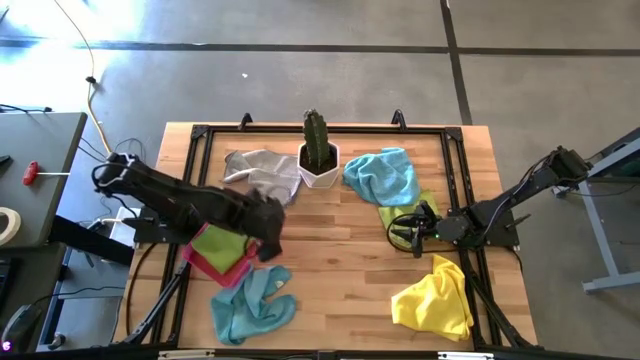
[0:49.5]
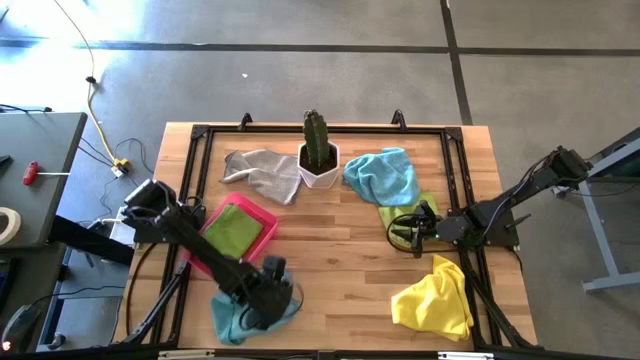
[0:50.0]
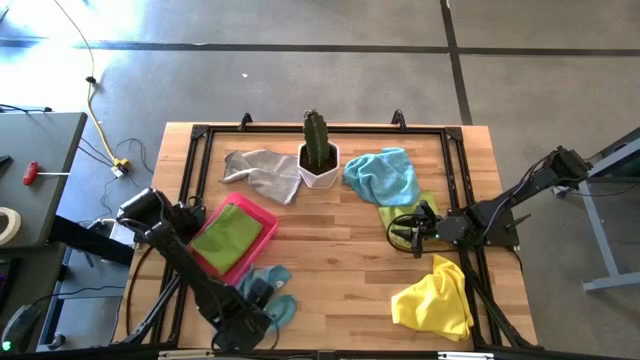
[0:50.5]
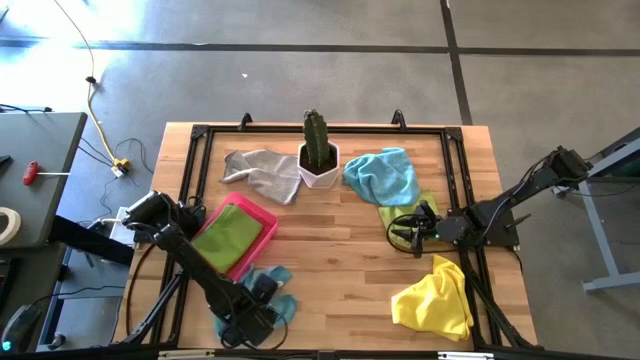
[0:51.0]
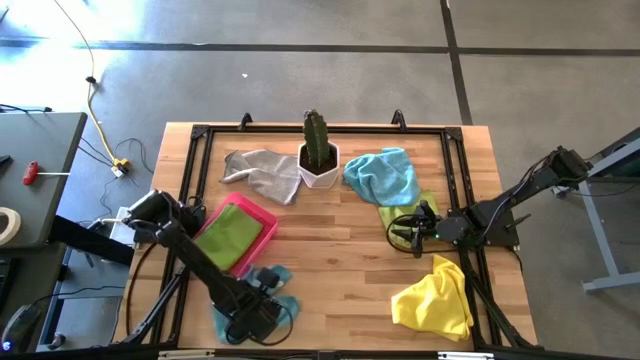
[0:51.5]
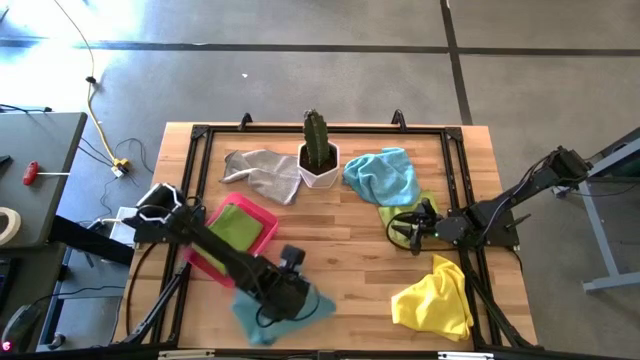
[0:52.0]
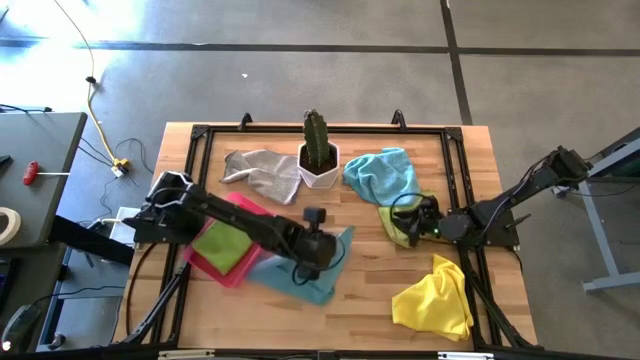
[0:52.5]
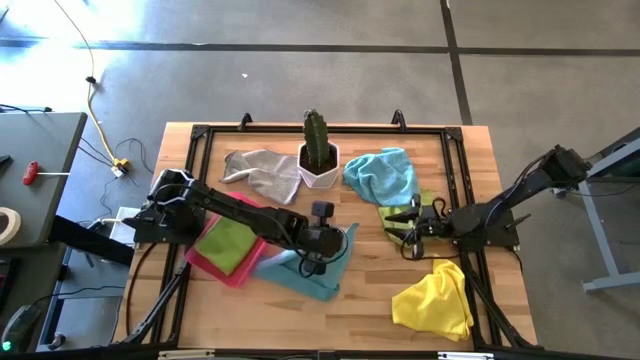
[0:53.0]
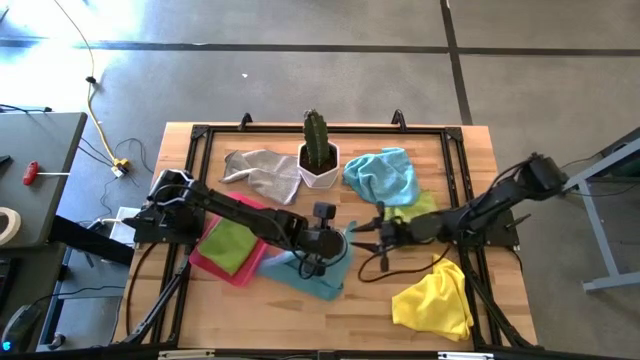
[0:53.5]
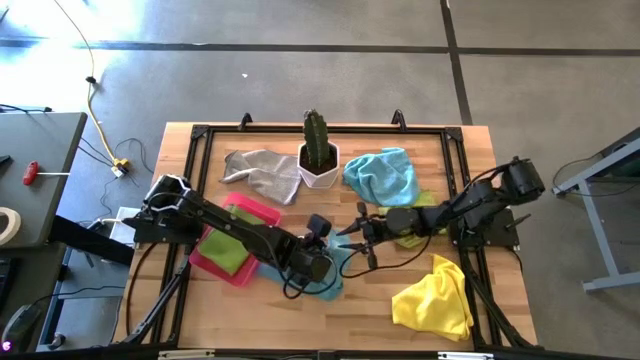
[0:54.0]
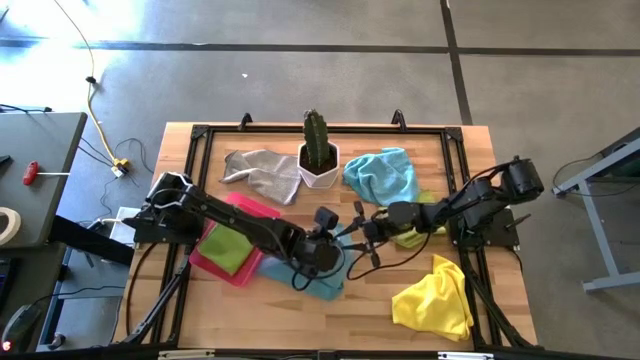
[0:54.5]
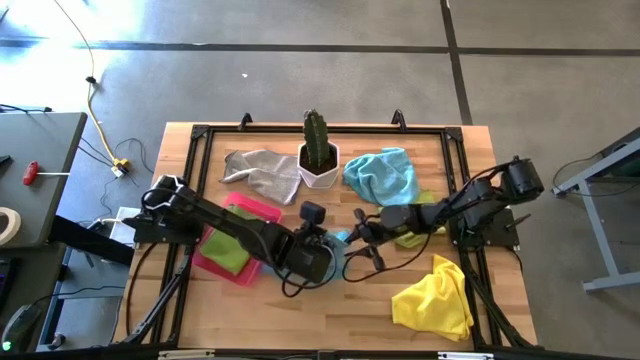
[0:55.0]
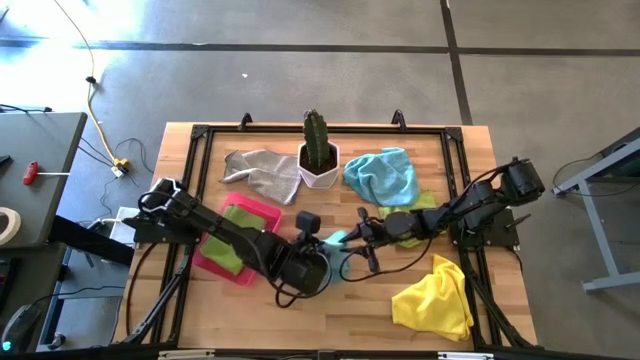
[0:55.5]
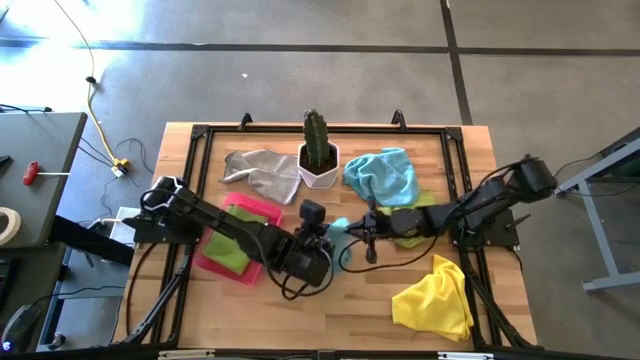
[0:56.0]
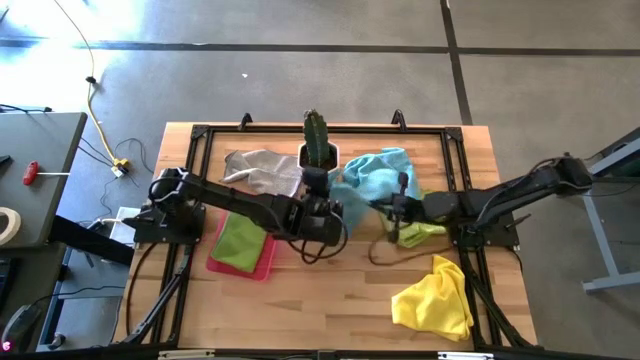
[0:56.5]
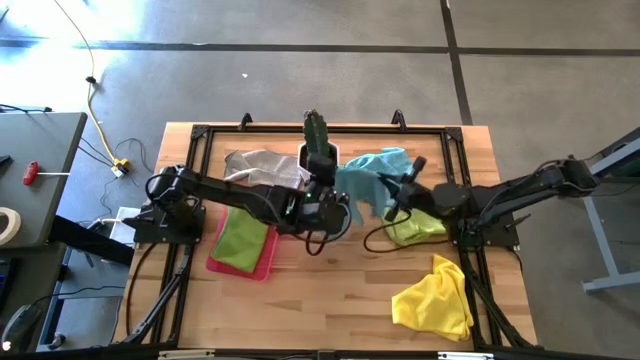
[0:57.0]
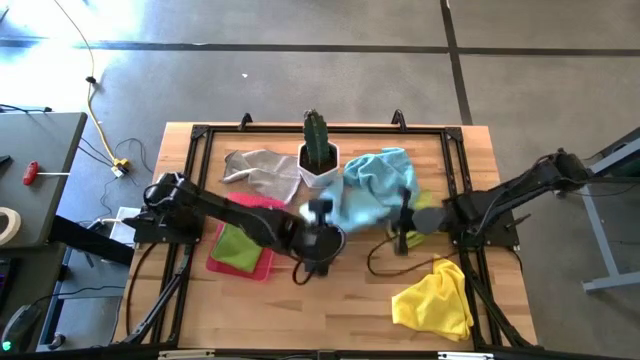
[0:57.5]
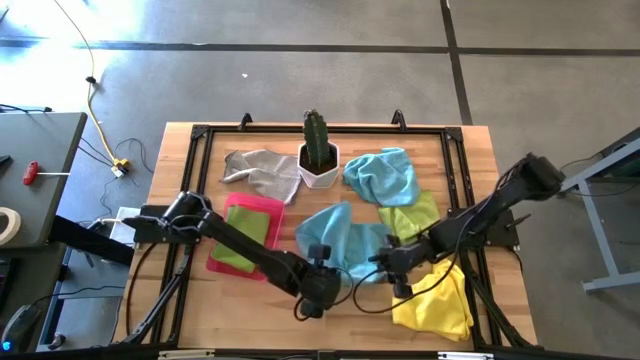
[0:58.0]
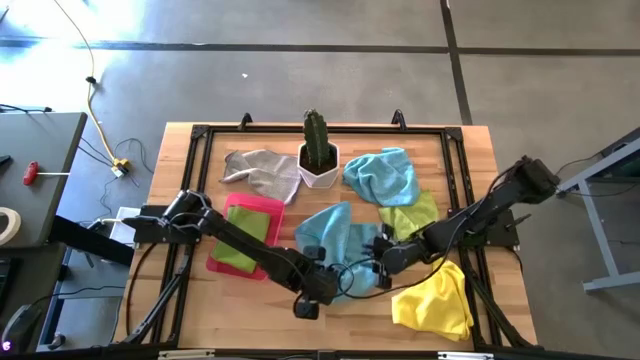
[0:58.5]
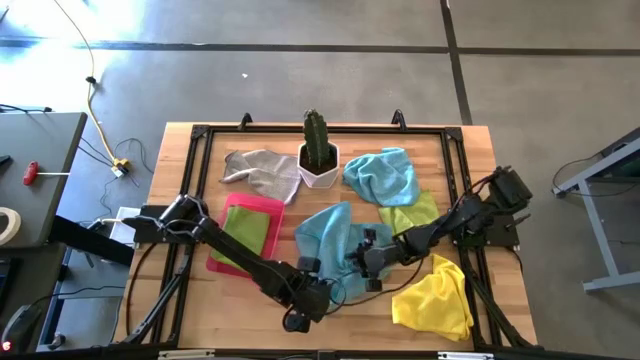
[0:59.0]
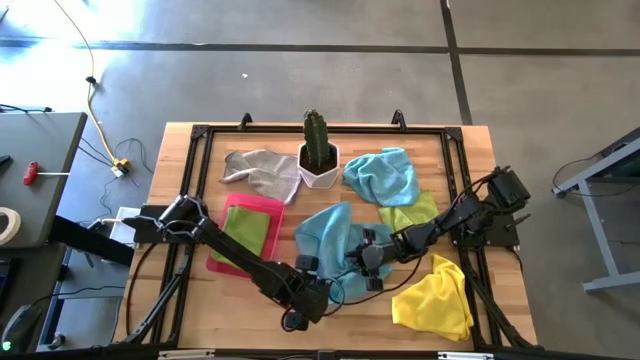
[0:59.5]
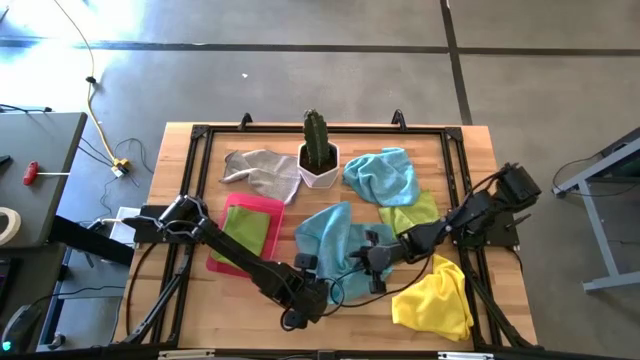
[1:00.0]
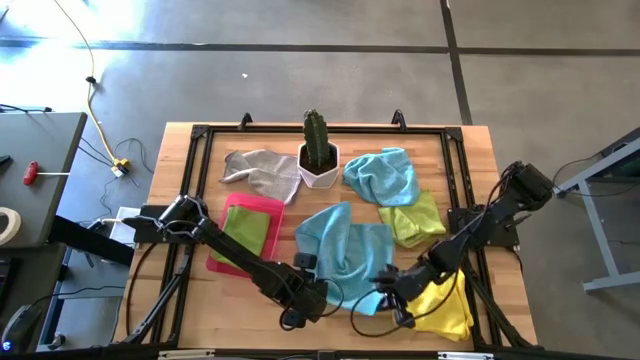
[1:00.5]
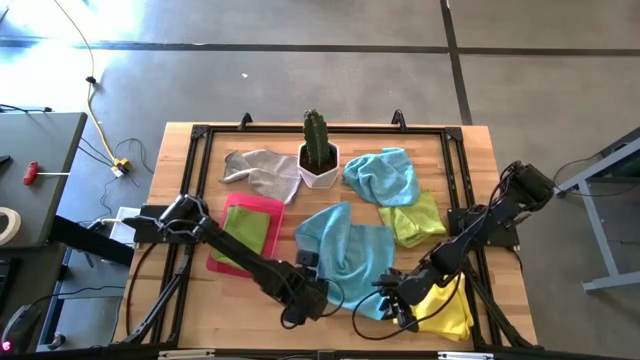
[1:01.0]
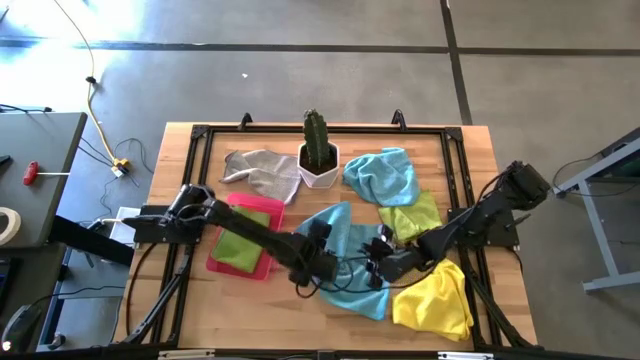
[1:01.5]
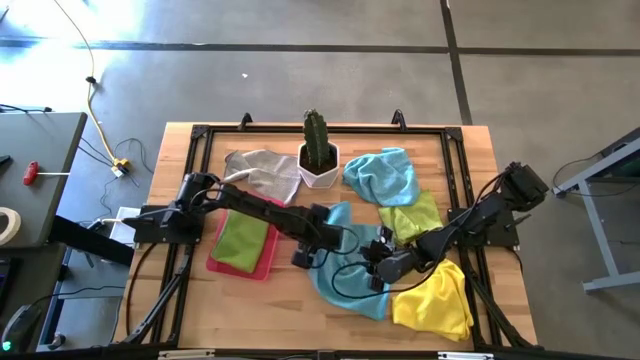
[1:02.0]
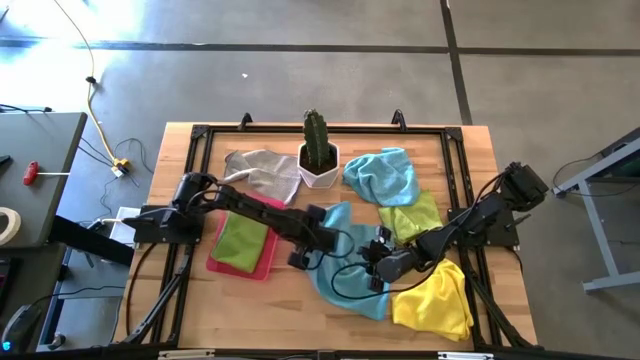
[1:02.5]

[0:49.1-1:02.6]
Task: Fold microfiber towels
Fold the bottom blue towel

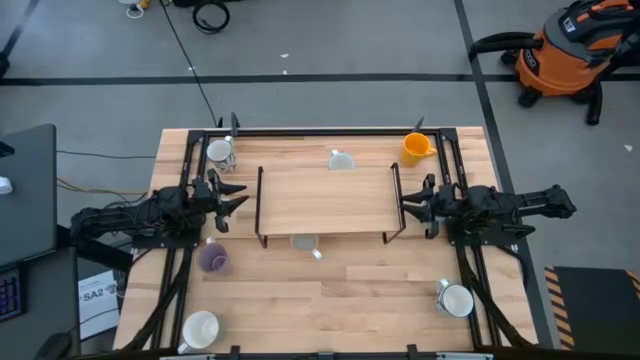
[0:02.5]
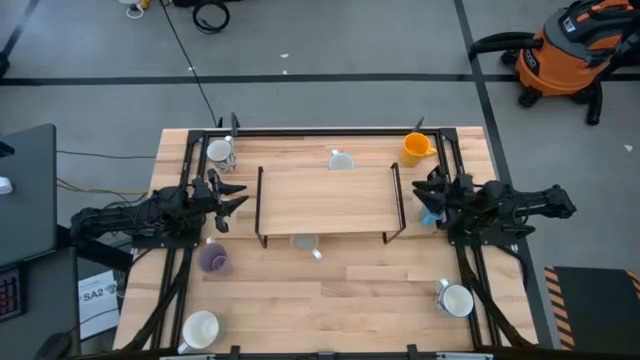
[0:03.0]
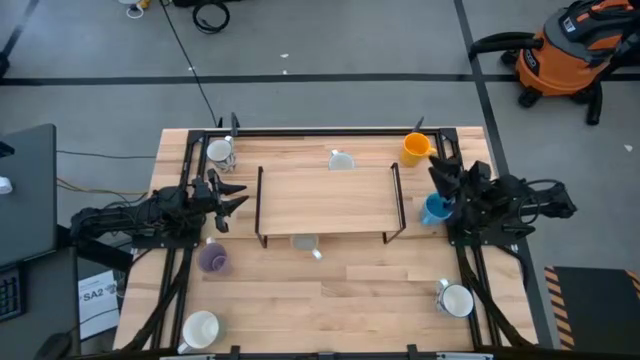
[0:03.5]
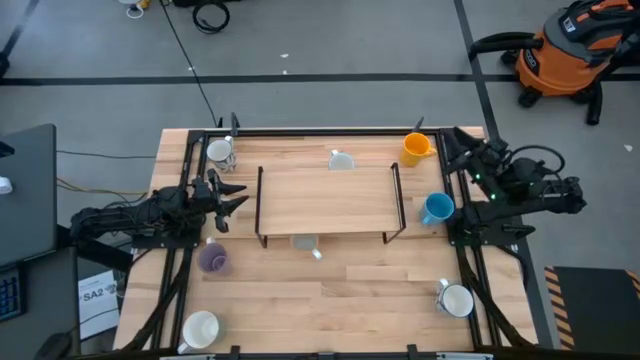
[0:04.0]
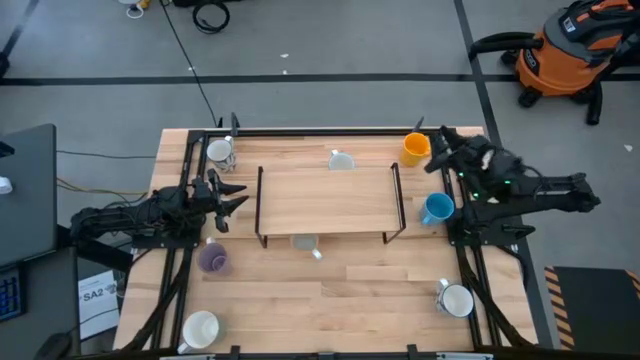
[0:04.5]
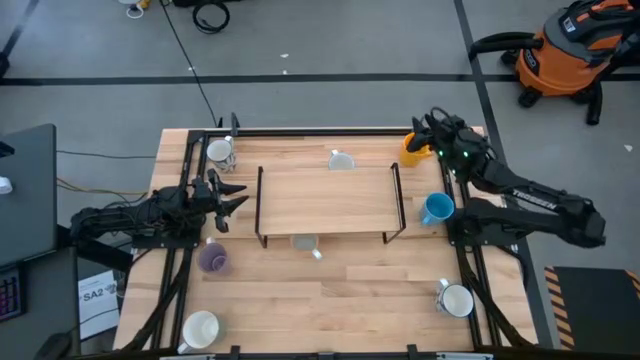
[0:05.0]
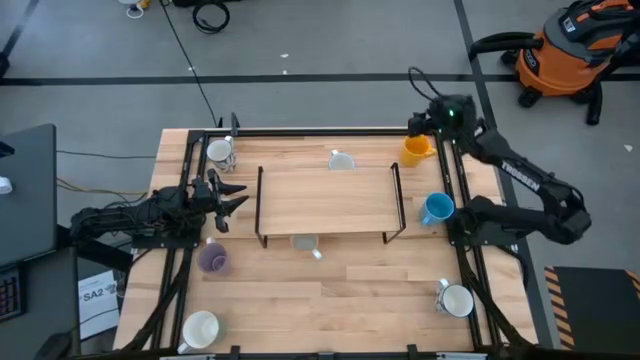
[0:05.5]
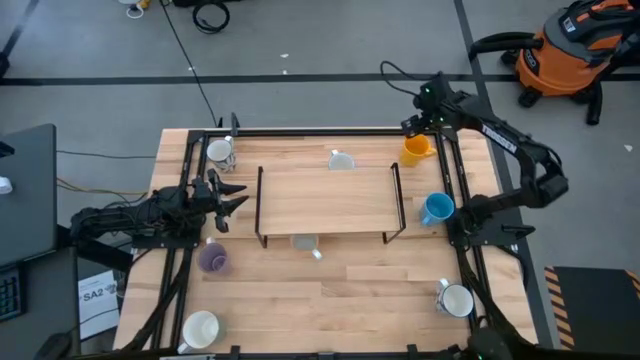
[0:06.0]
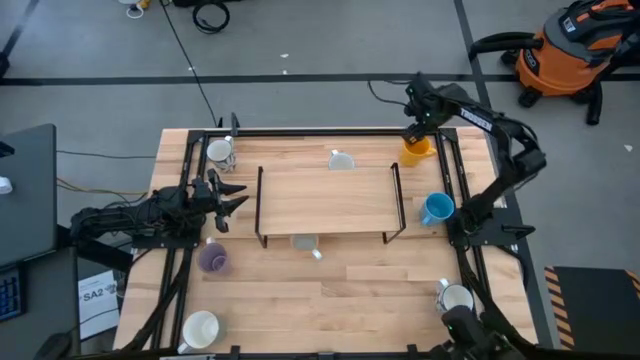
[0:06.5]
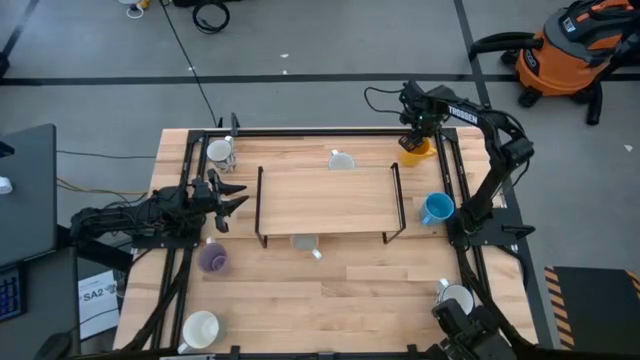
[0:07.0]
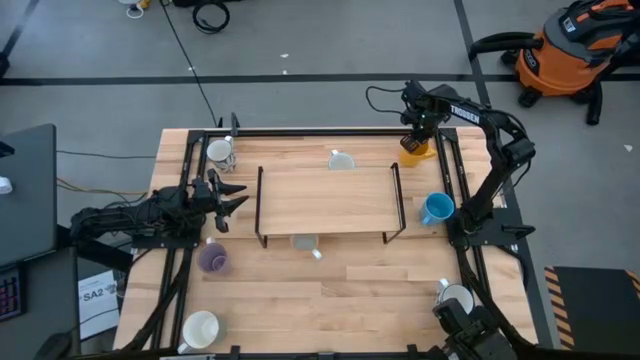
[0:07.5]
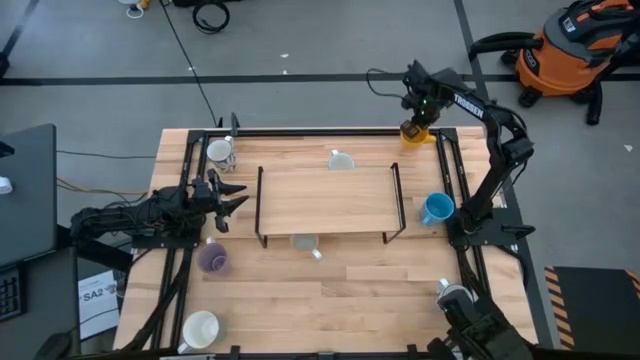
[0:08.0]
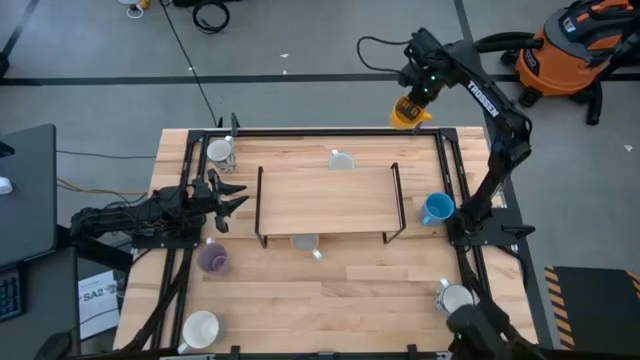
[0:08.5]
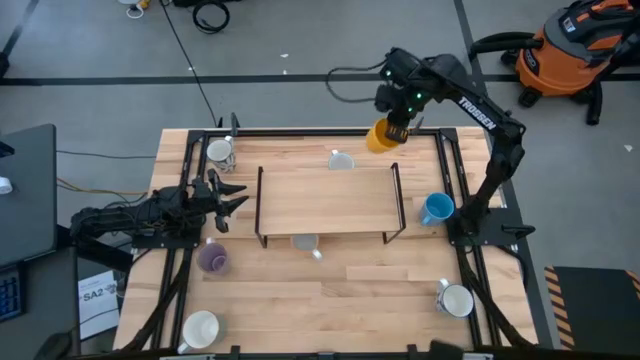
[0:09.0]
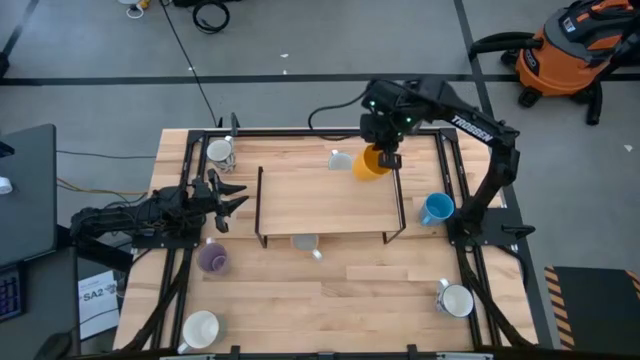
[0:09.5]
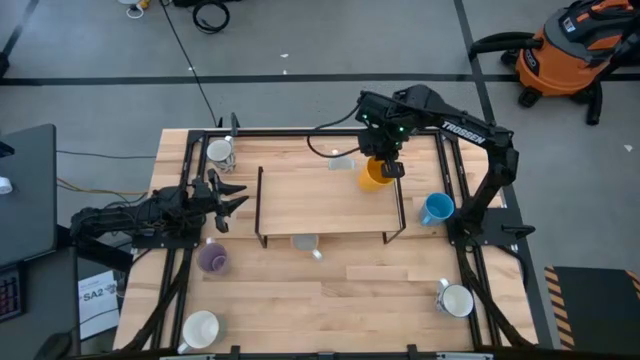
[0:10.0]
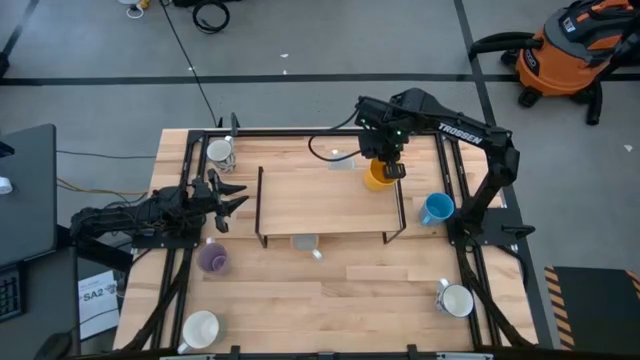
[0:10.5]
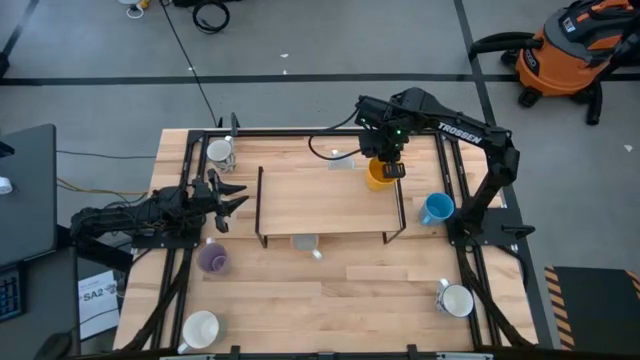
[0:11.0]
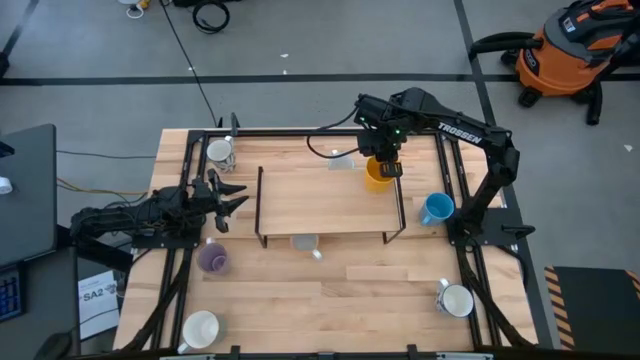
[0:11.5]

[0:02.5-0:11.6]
Task: Place coffee mugs
Put the yellow mug on the shelf
